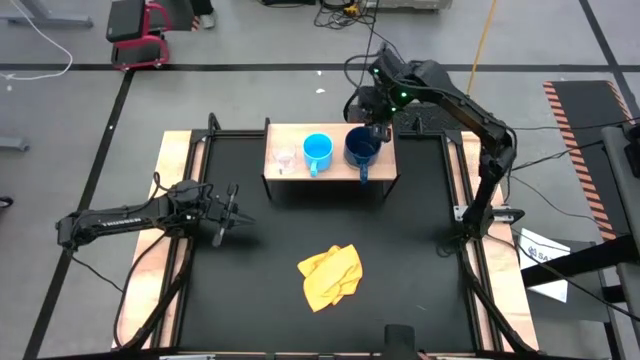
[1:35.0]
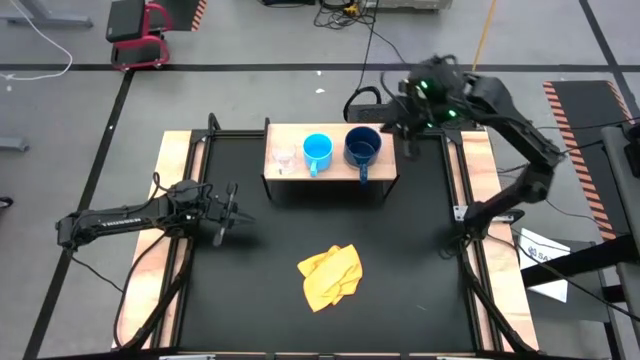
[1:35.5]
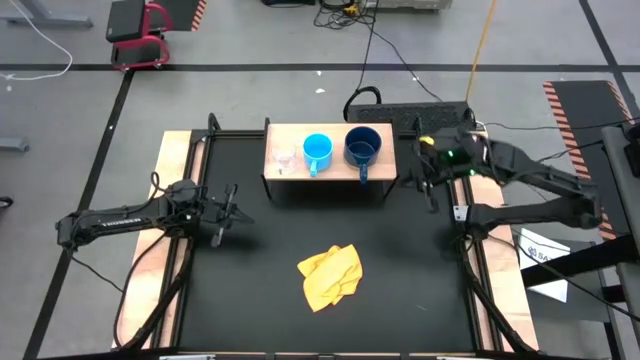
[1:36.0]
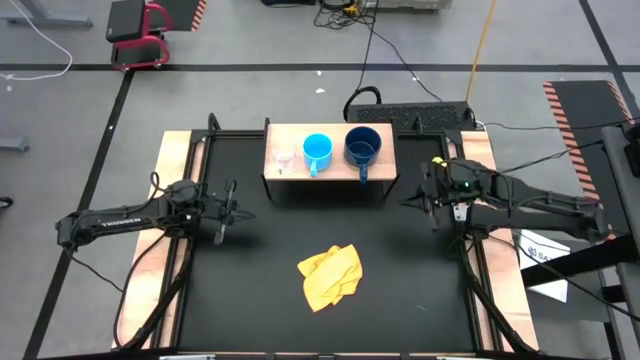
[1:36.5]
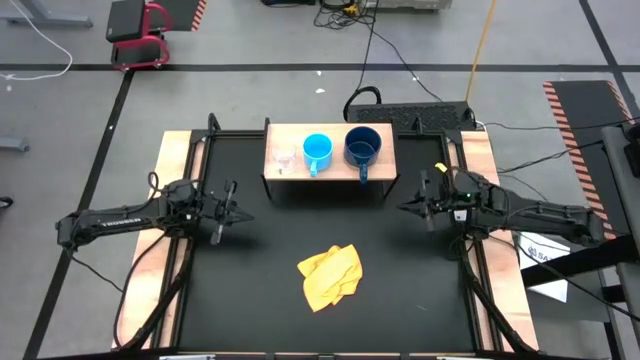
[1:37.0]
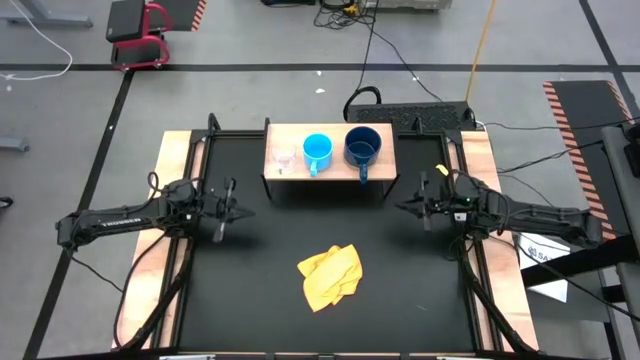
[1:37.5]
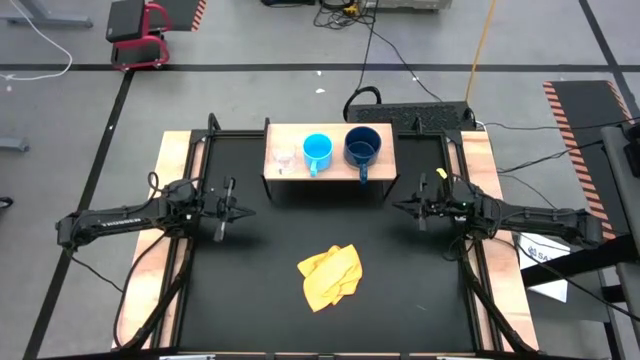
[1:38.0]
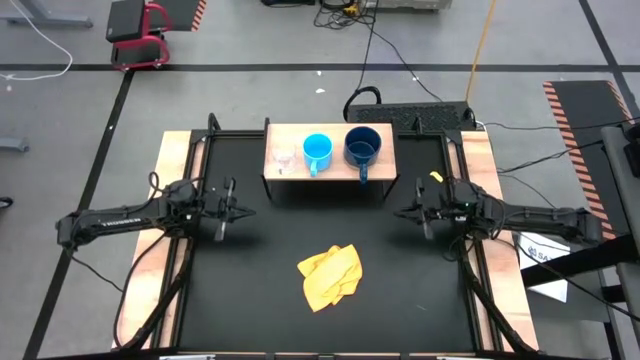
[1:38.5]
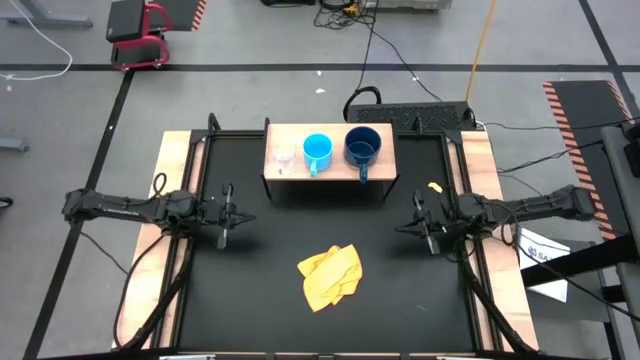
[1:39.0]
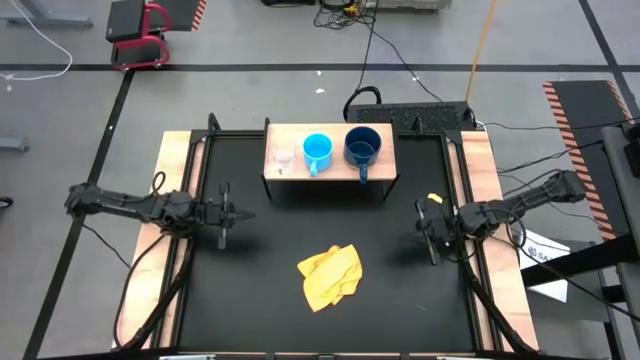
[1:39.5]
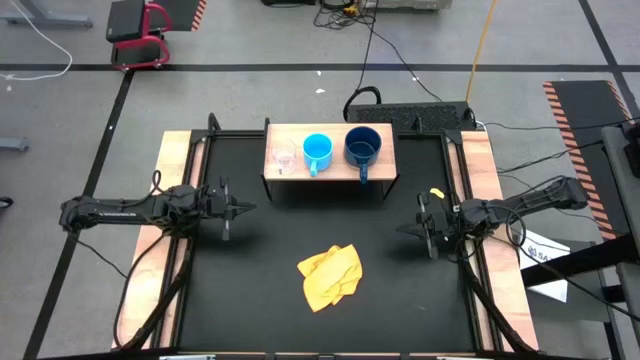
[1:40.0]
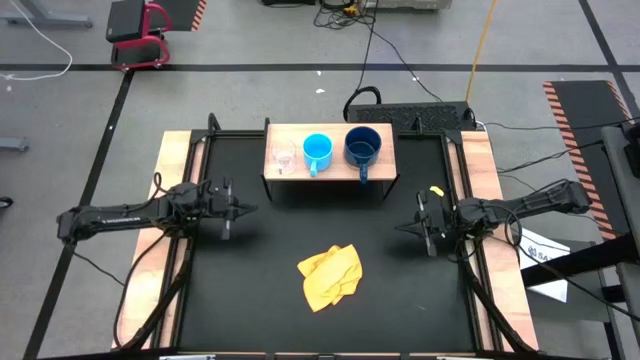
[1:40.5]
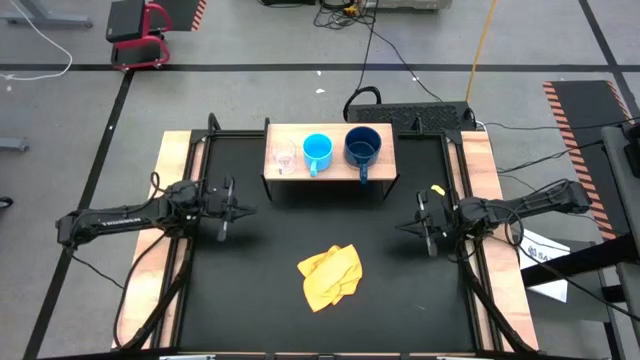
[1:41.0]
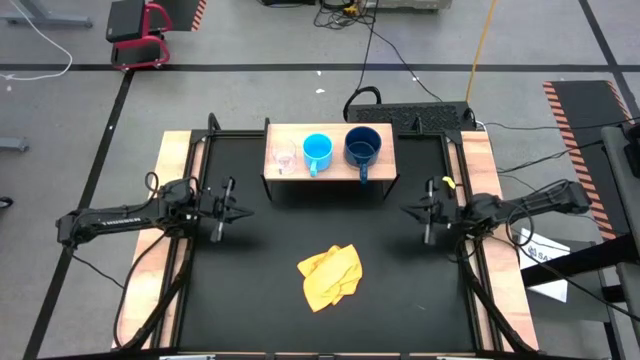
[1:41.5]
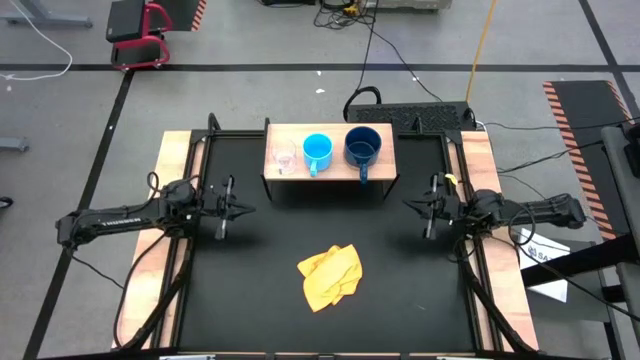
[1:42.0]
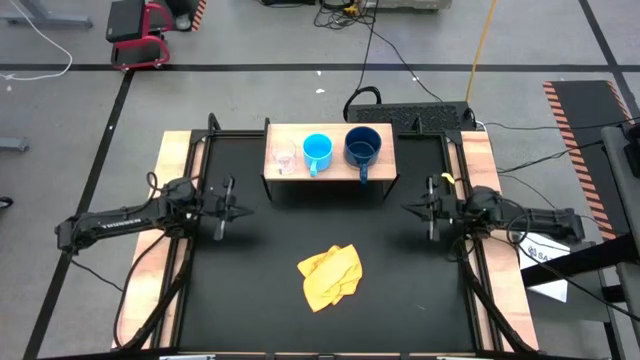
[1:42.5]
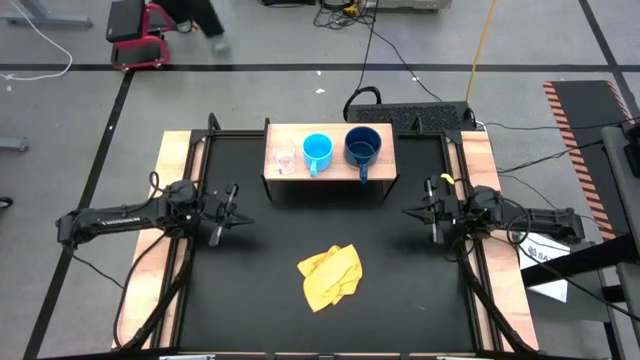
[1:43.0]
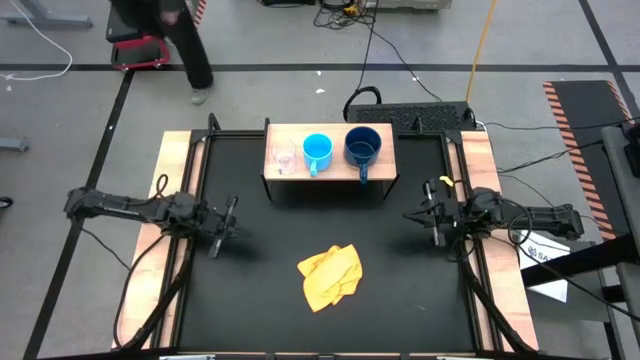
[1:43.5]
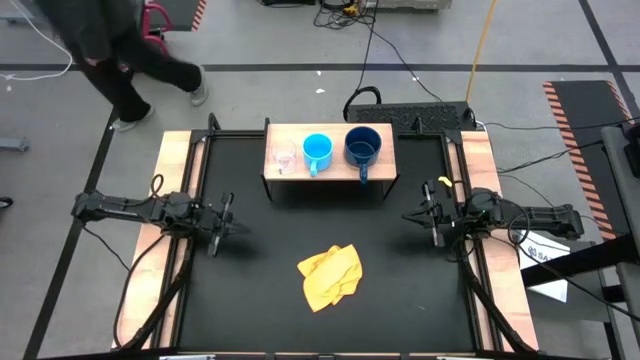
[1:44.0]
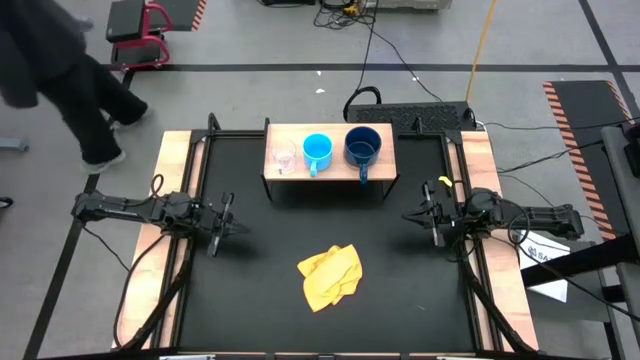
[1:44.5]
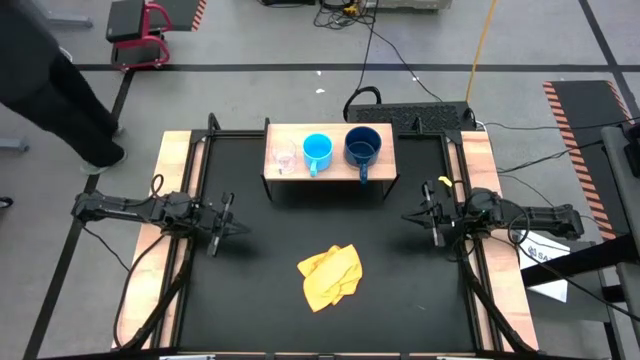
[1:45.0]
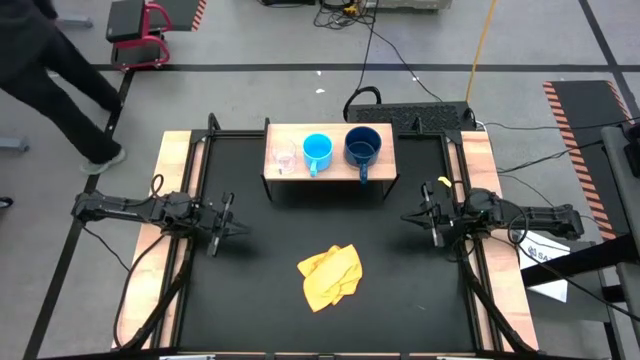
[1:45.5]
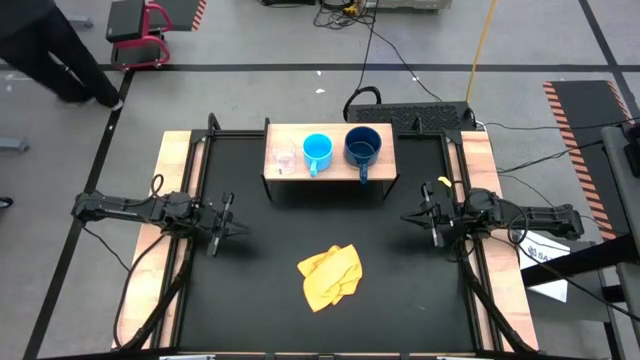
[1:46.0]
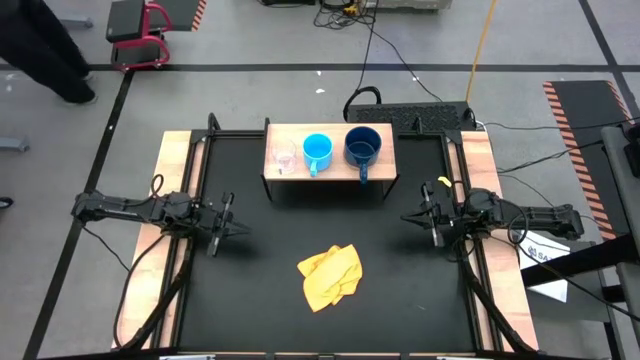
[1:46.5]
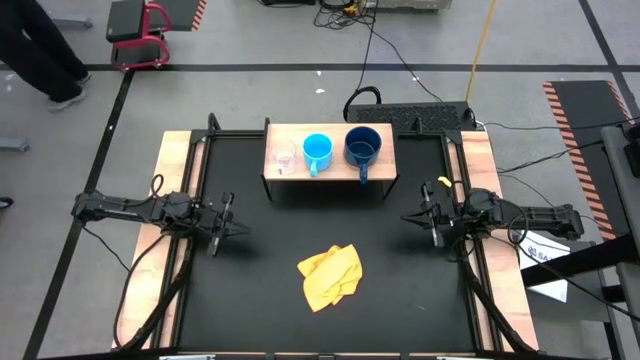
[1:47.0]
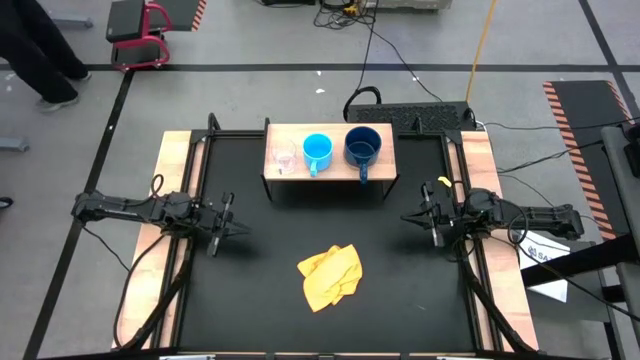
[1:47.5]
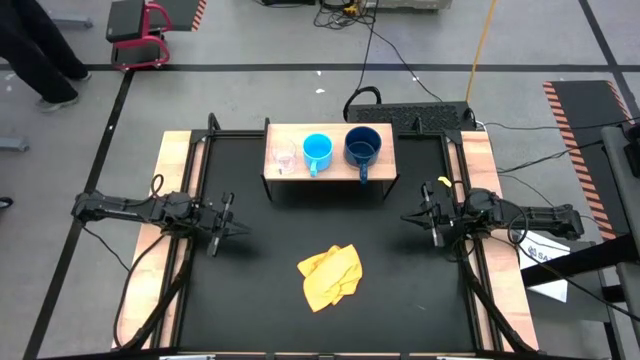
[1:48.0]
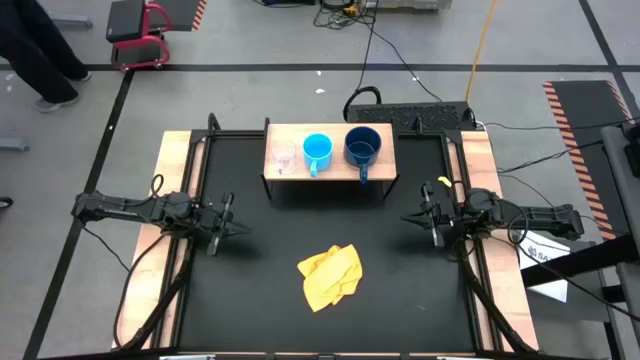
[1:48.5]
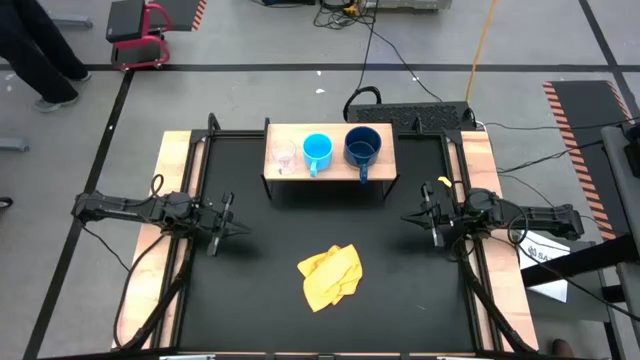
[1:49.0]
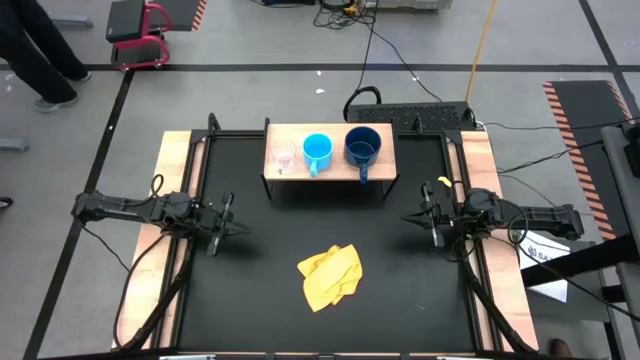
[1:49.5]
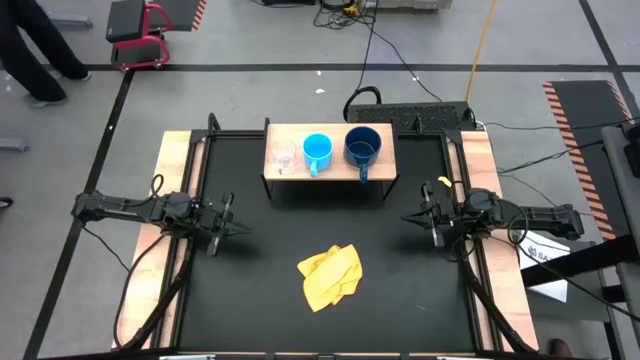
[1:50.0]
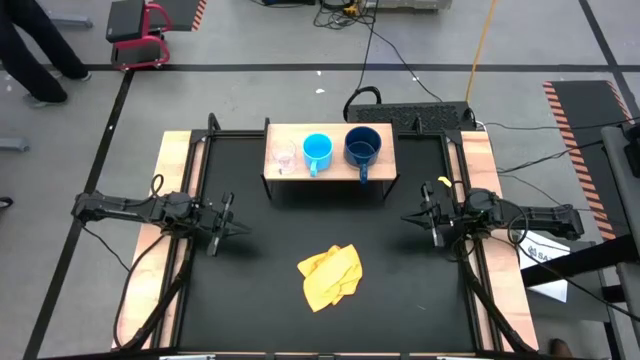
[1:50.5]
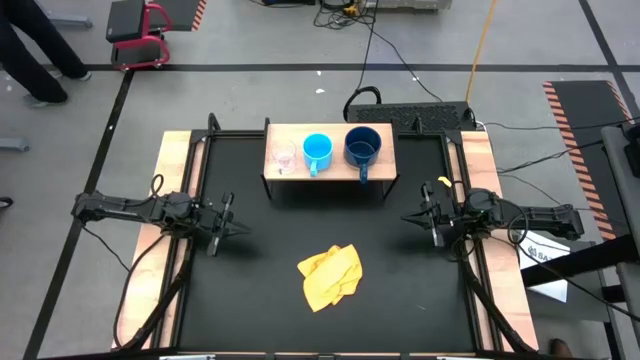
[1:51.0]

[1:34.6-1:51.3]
Task: Stack small to large cups/mugs on shelf
Return to Home Position
